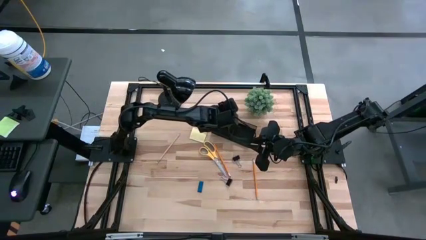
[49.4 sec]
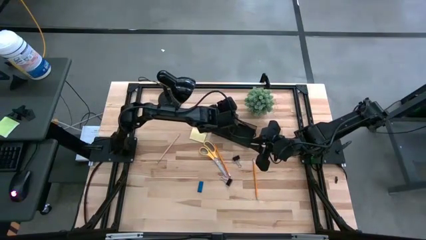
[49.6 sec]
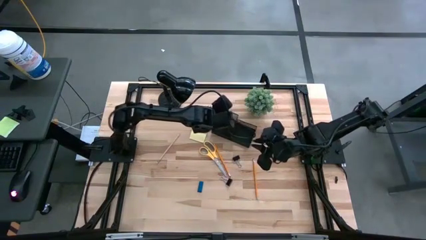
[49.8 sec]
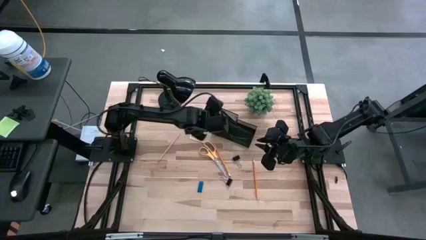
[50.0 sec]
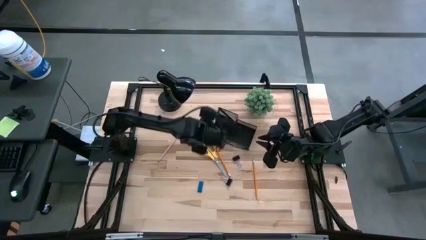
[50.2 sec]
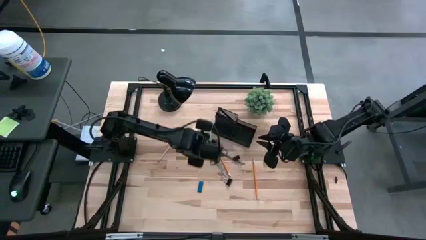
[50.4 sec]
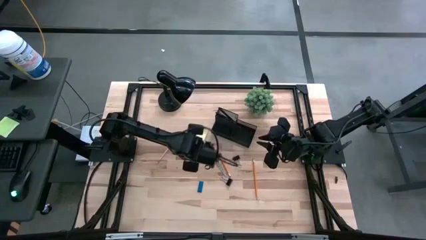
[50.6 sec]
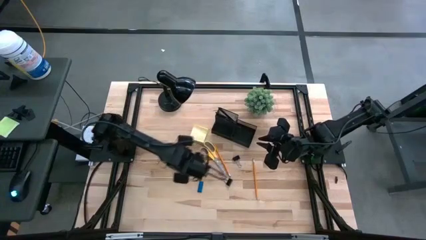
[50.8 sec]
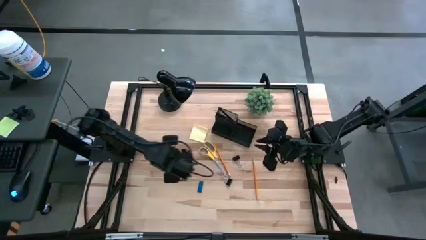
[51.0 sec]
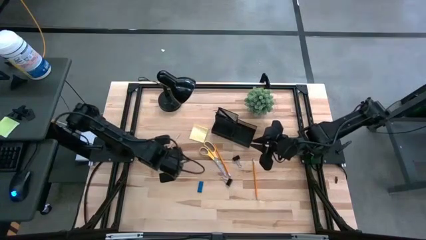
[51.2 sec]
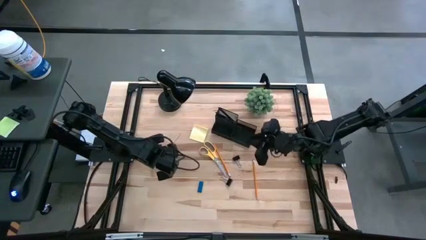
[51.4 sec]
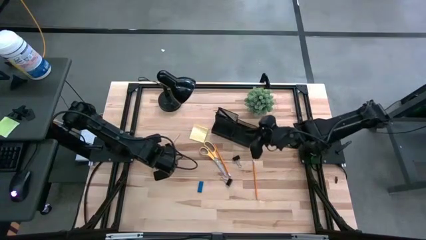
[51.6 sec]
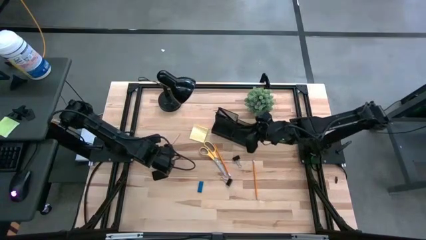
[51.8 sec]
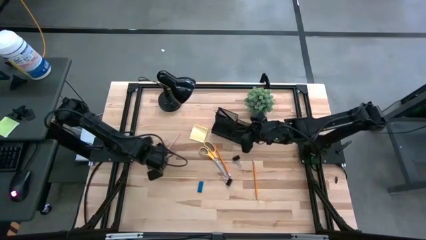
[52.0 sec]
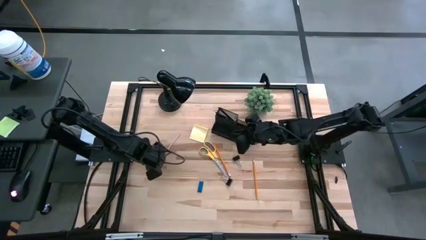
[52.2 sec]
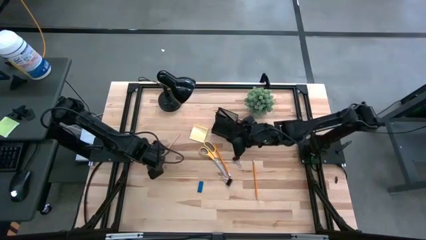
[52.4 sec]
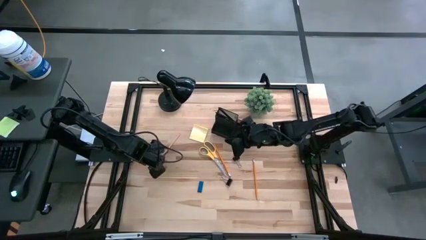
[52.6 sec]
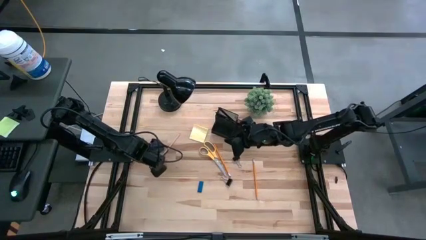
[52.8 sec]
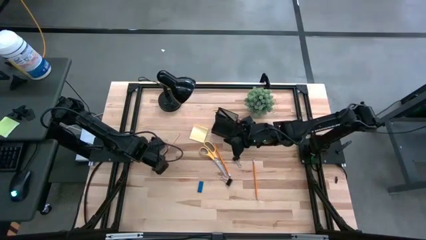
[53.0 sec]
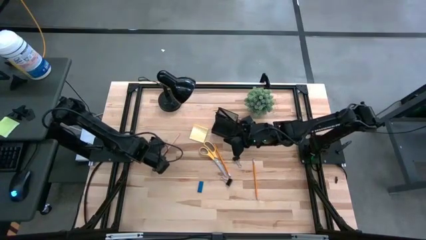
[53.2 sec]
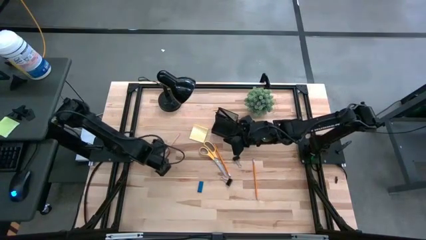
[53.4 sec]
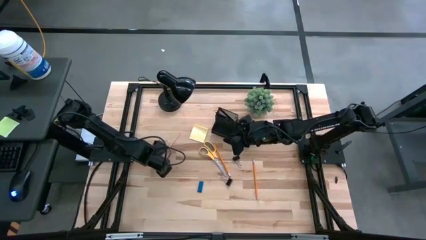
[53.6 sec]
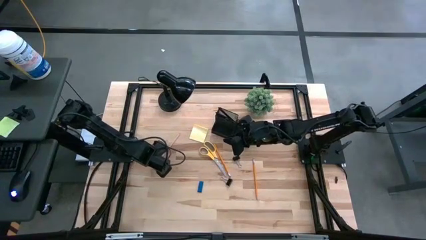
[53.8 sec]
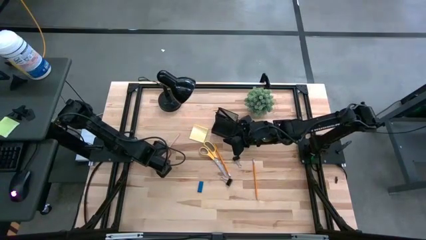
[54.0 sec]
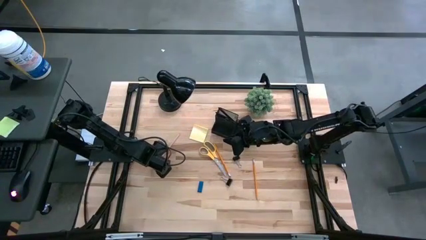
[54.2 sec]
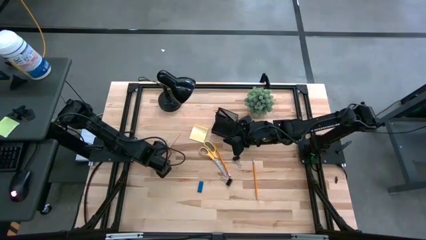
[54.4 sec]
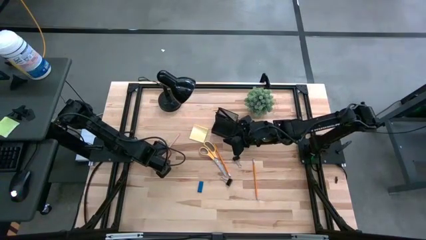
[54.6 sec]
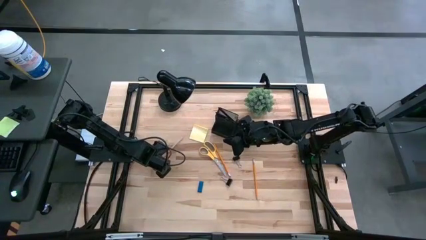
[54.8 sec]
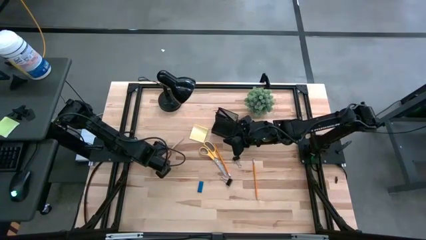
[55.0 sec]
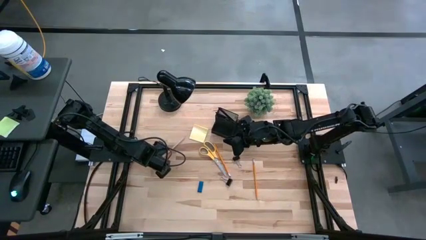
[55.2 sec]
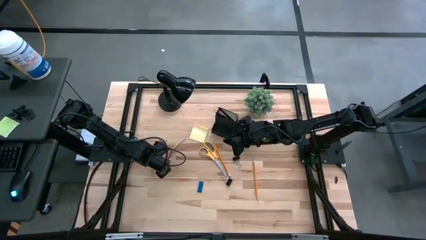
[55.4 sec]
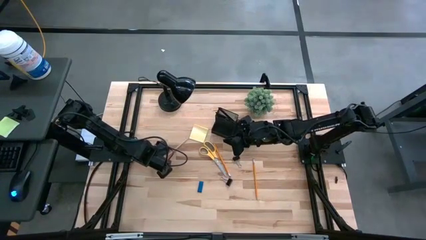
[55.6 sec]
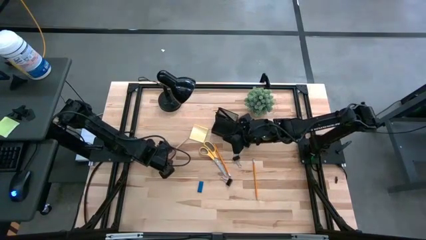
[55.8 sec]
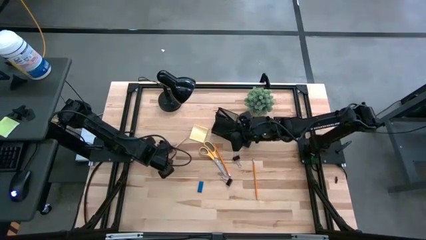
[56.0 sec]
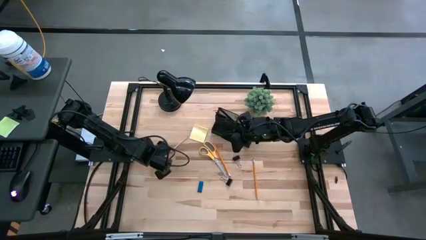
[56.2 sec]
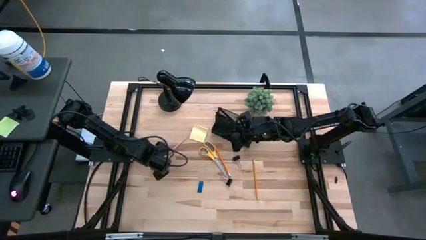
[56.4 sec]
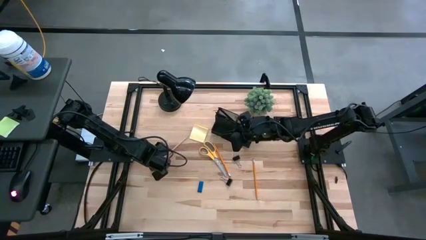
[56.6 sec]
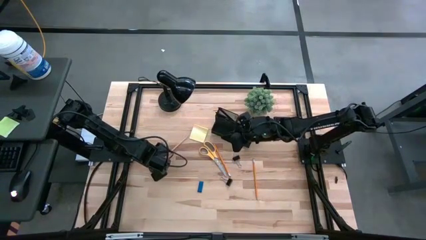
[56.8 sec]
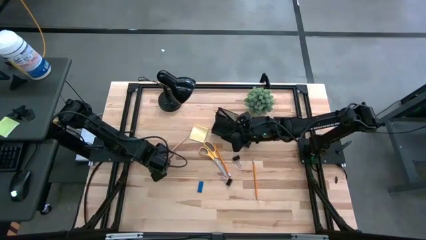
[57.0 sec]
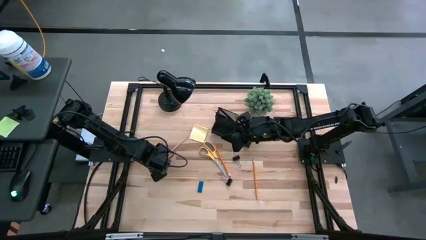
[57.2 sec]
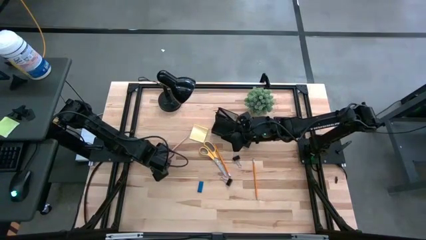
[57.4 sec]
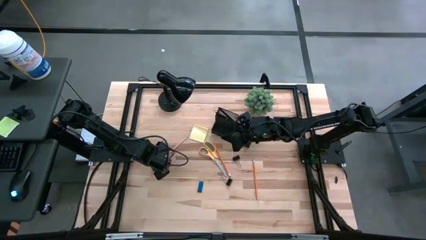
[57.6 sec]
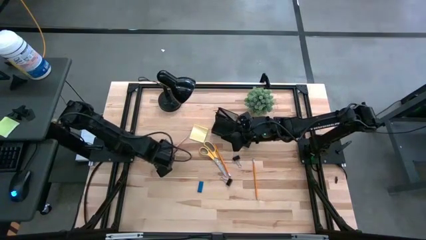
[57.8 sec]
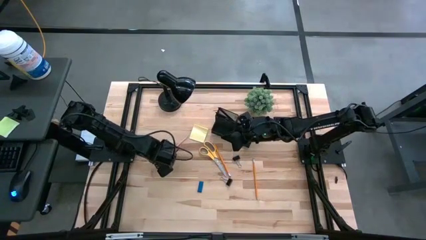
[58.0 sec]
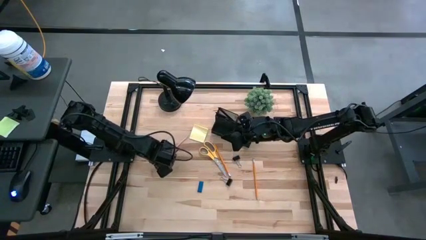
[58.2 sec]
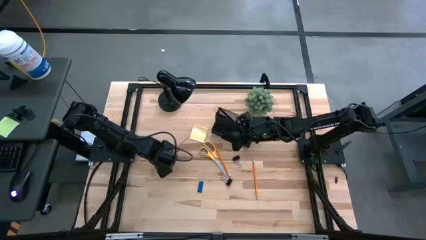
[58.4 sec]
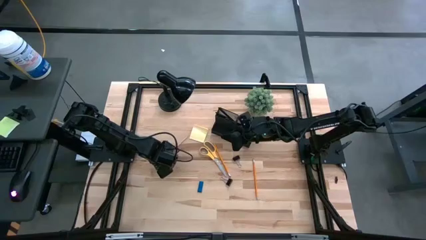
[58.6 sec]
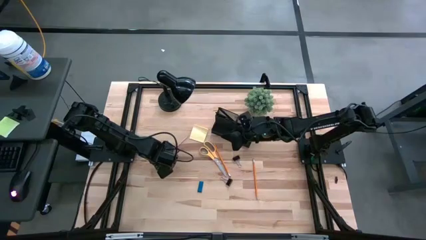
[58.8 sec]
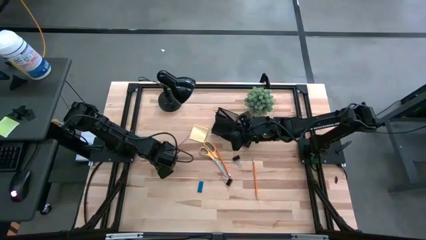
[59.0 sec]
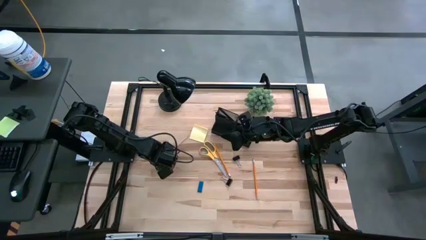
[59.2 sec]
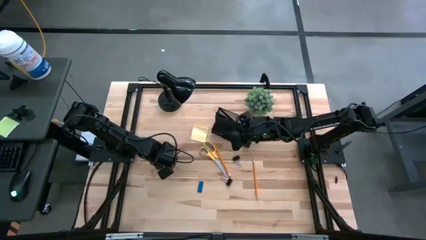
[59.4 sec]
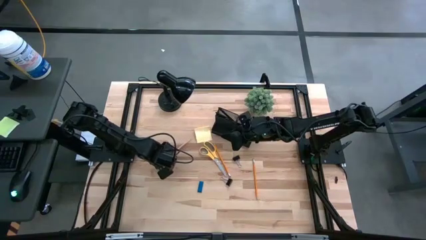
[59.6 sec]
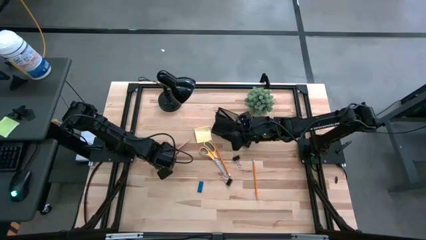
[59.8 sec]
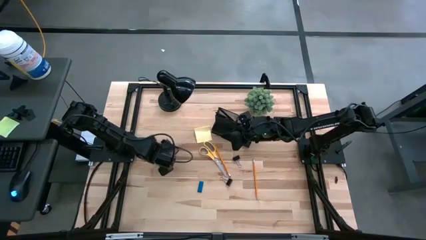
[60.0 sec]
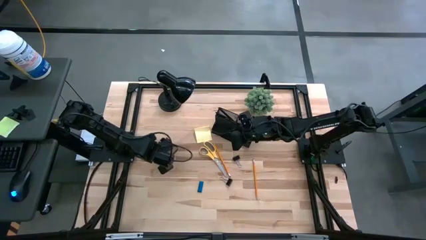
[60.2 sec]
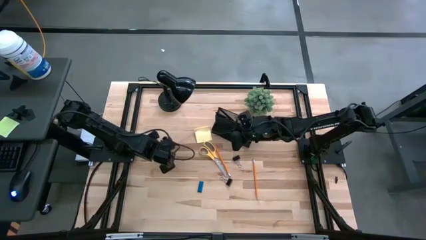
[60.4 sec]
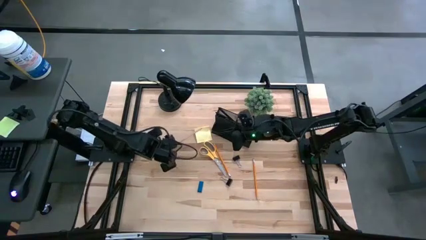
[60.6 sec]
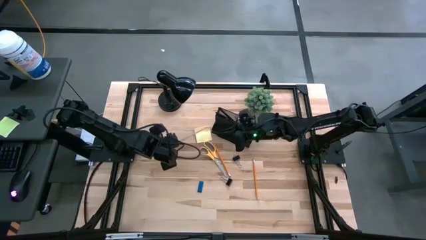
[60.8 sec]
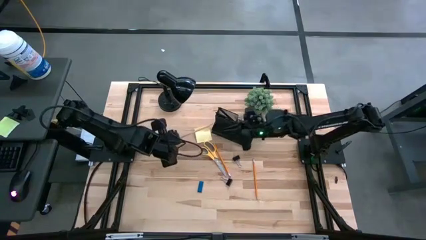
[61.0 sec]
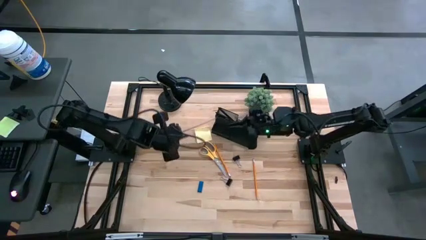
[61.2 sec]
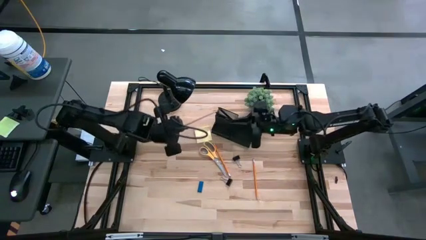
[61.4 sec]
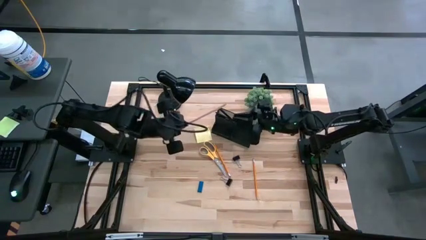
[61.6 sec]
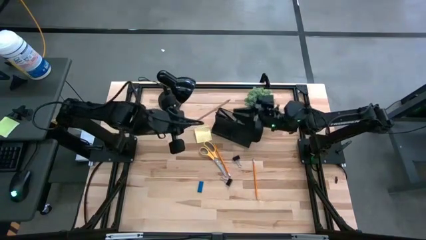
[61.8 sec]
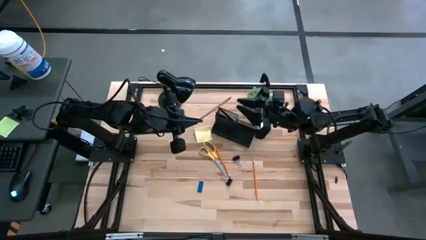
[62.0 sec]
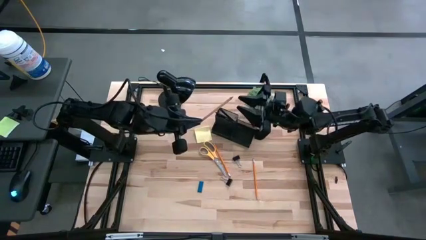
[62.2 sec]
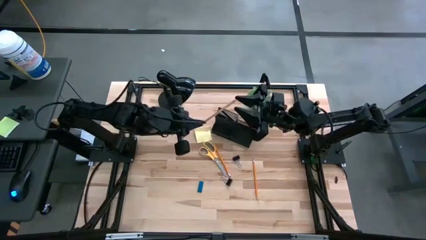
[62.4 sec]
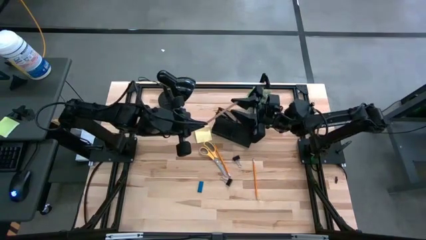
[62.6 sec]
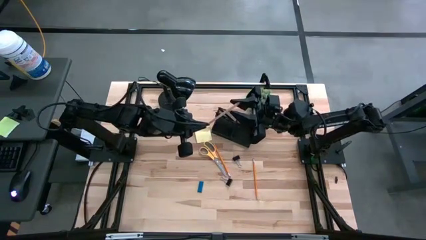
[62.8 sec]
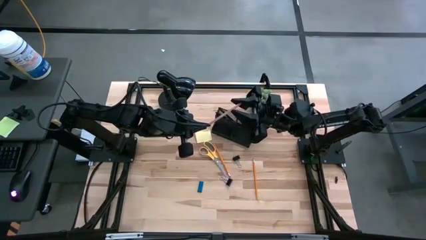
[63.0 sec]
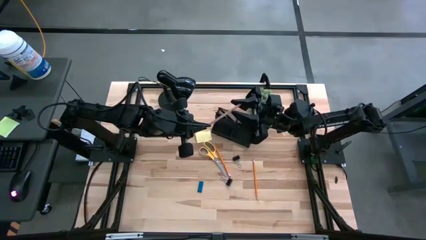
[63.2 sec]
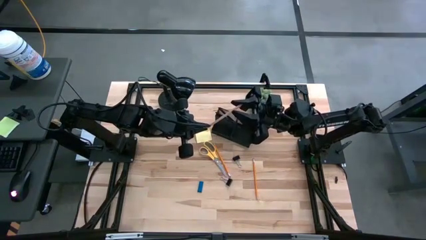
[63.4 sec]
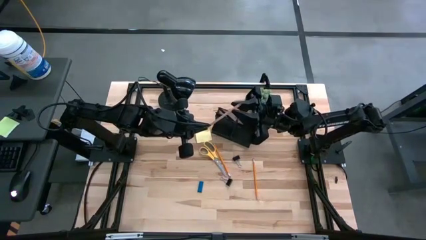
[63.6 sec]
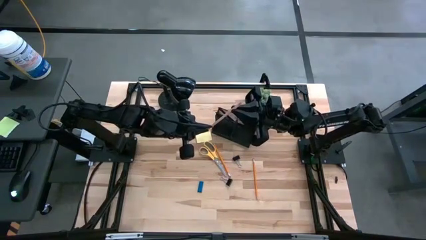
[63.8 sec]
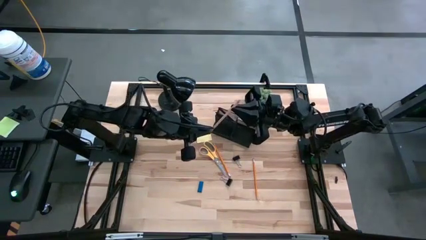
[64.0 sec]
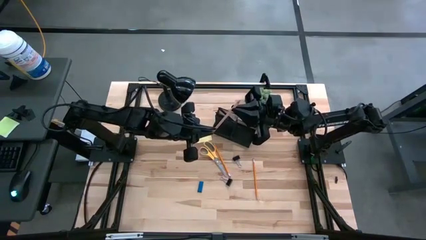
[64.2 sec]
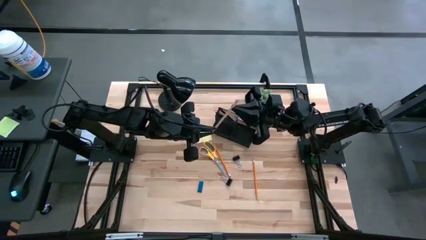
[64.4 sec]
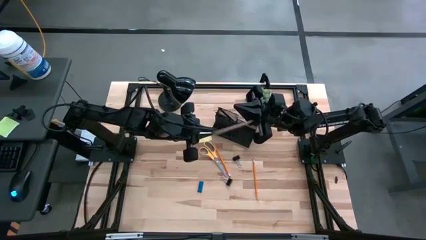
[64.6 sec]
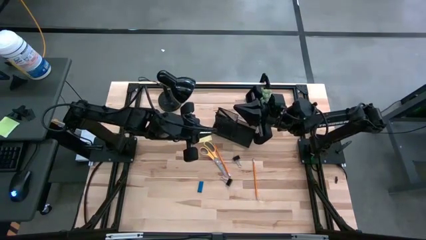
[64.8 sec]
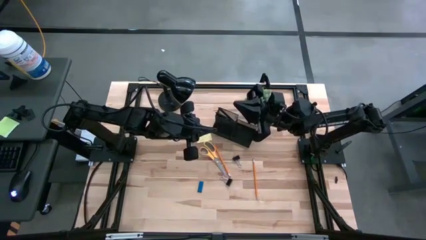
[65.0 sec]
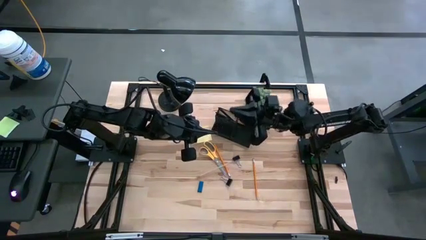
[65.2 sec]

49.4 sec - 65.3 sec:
Task: Pick and place office supplies into organizer
Put the pink pencil into the desk organizer
